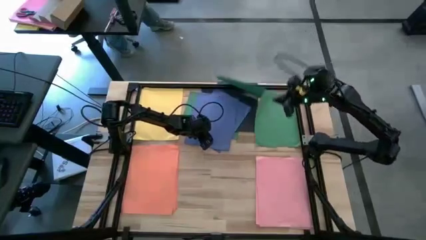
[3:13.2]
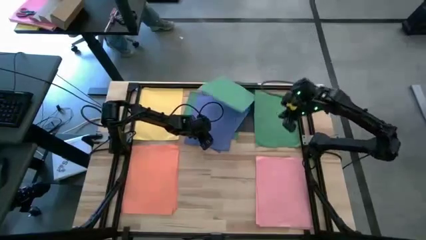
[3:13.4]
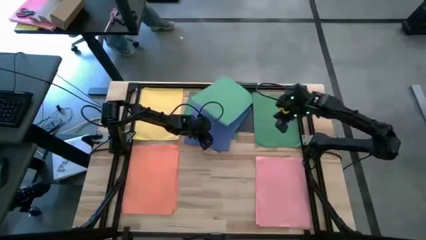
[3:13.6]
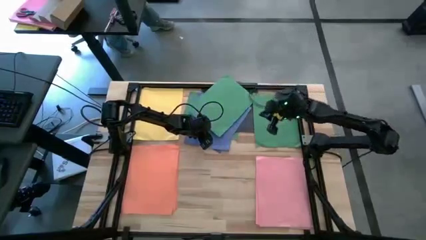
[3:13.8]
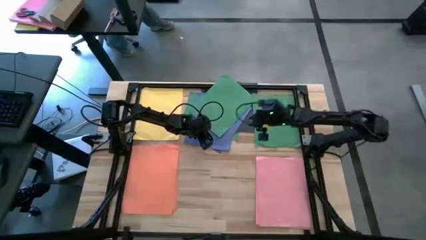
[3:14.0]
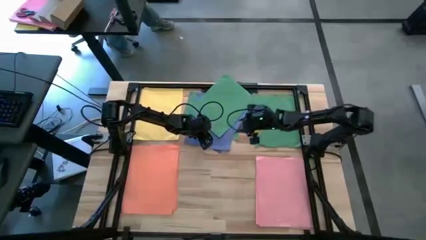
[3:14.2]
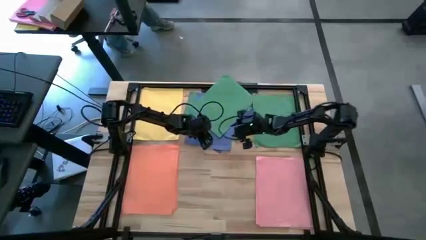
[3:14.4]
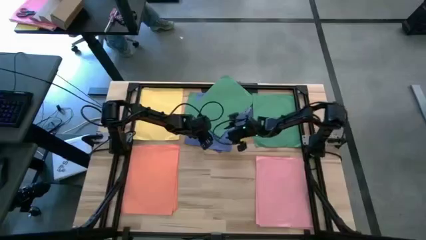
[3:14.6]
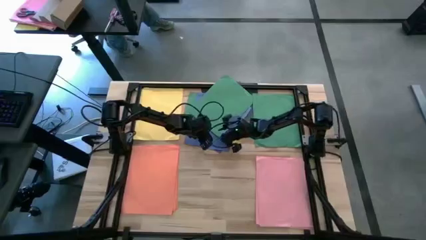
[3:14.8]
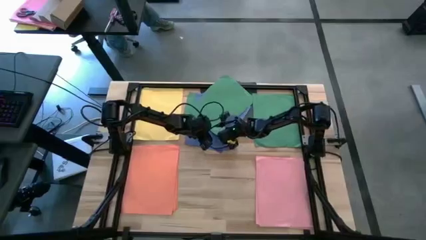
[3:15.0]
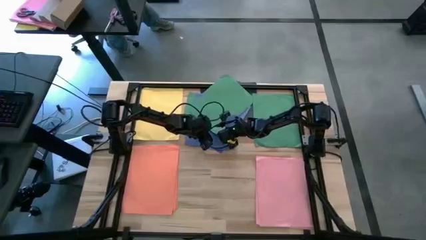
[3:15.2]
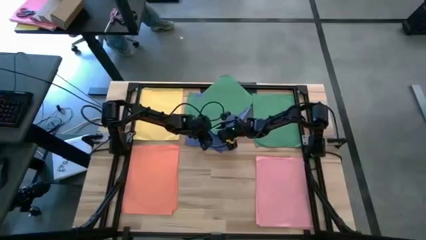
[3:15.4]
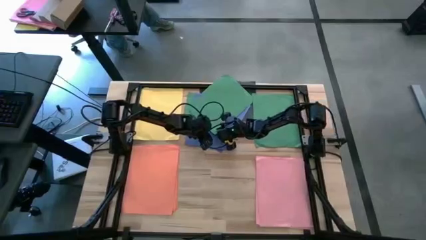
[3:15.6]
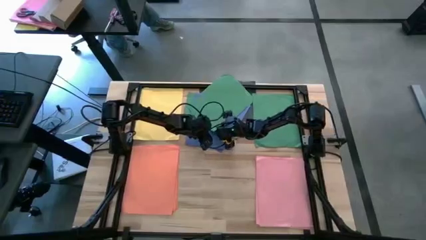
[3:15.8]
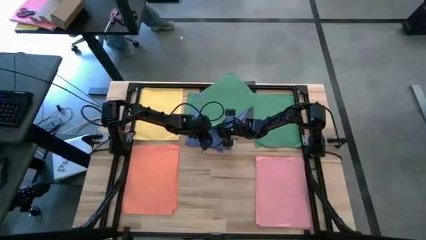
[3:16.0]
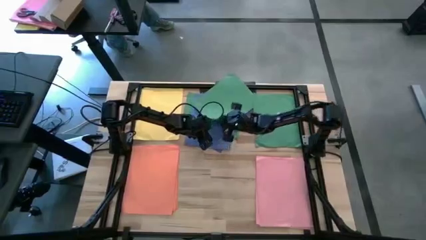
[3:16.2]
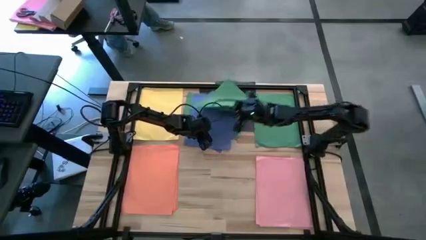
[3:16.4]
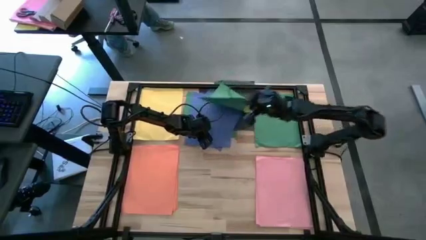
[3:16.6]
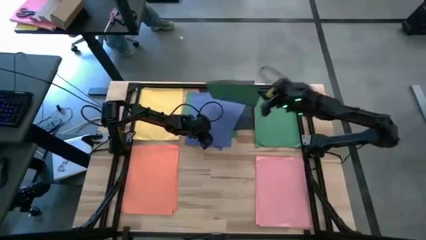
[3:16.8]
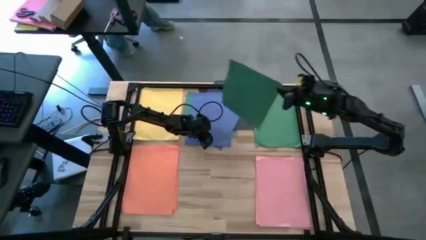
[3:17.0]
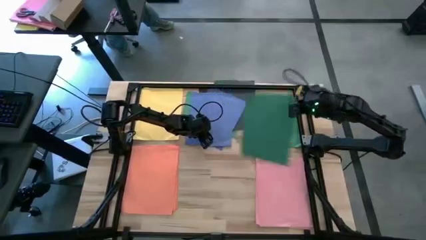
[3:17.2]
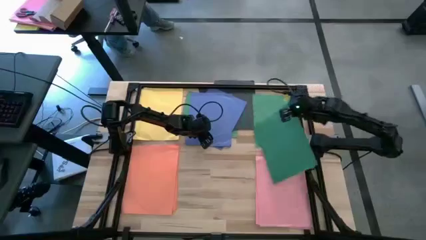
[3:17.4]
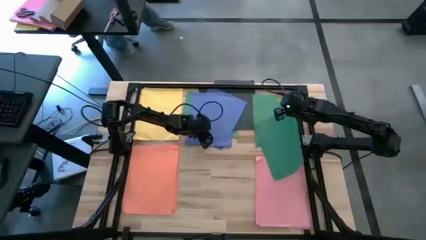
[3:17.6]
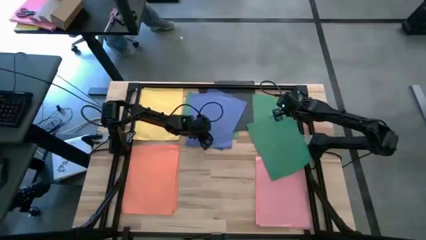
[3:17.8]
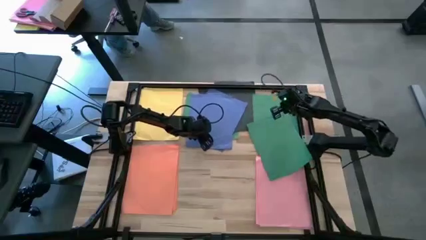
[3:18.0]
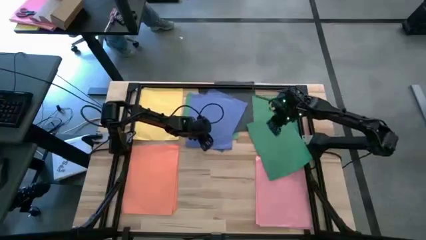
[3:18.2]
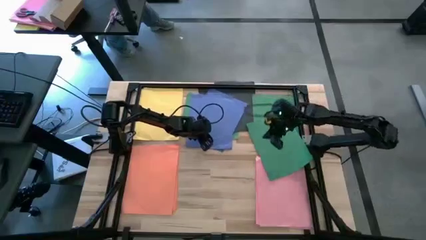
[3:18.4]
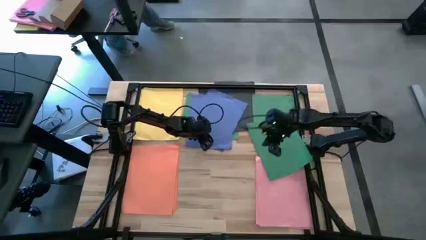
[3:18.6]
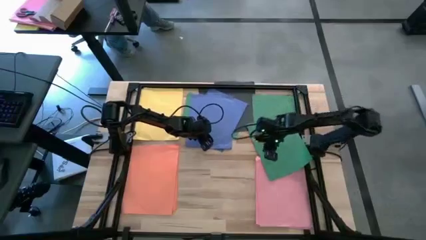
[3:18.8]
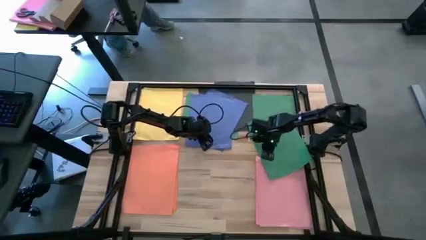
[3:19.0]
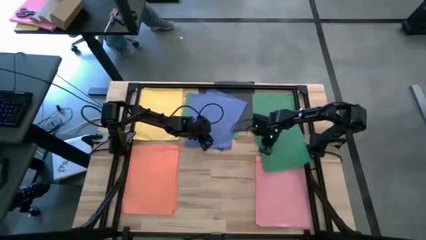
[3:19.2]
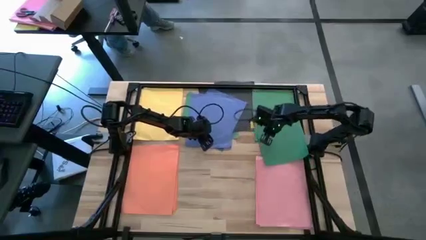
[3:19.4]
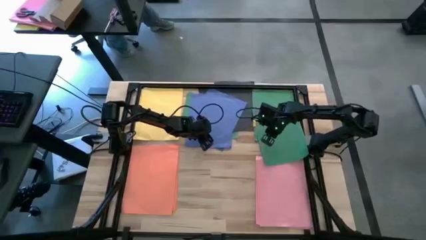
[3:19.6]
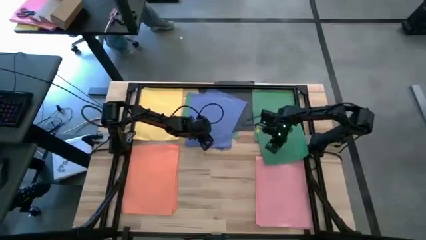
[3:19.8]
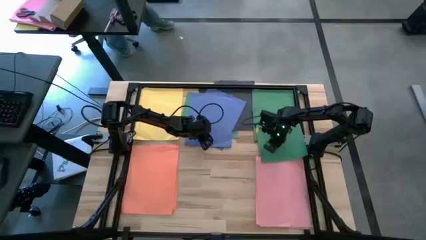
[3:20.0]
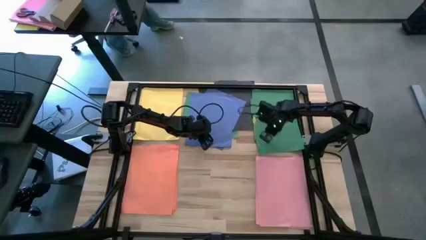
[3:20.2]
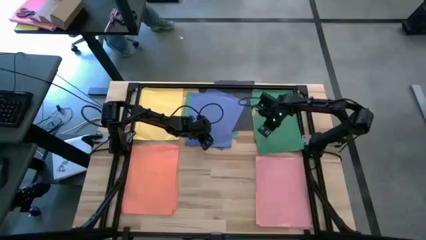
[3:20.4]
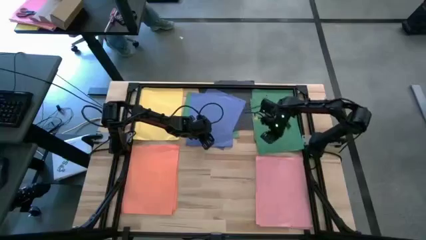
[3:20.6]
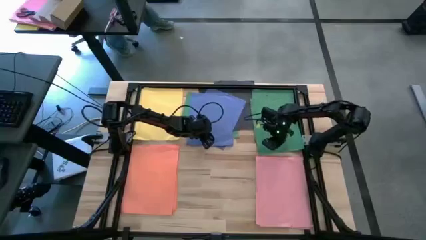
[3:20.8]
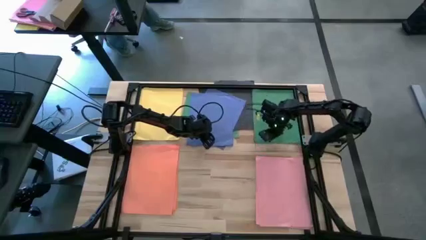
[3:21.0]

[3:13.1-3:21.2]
Task: Organize paper
Stack the green paper on top of the other green paper

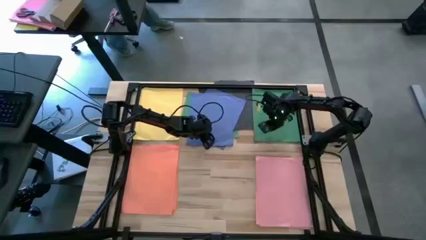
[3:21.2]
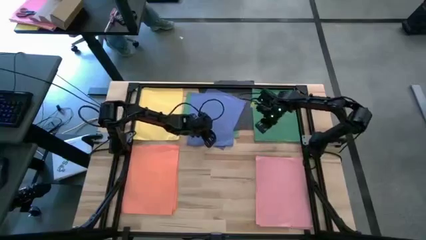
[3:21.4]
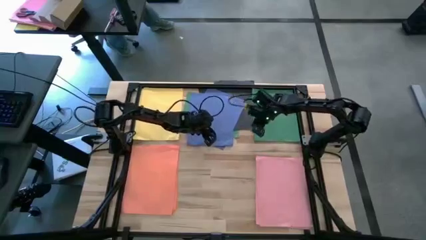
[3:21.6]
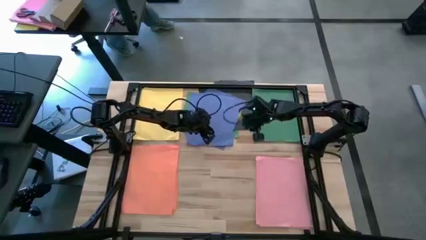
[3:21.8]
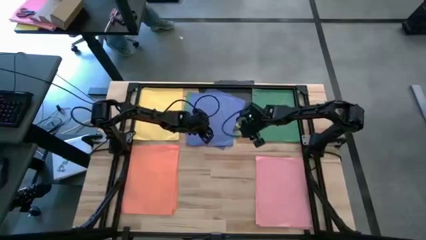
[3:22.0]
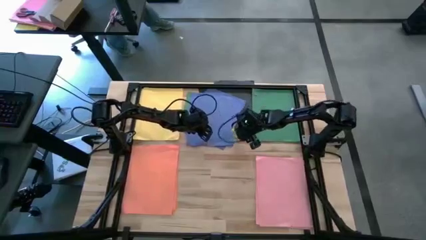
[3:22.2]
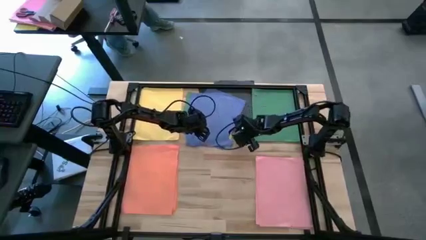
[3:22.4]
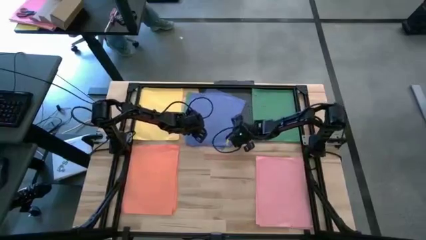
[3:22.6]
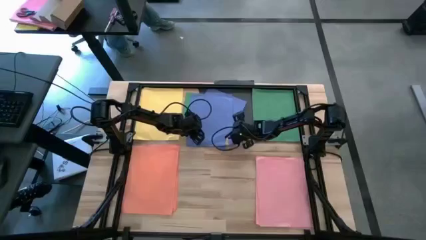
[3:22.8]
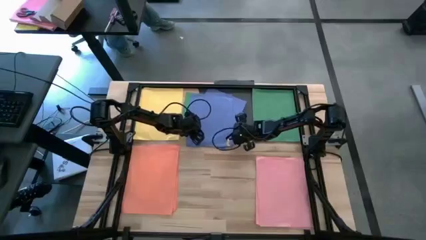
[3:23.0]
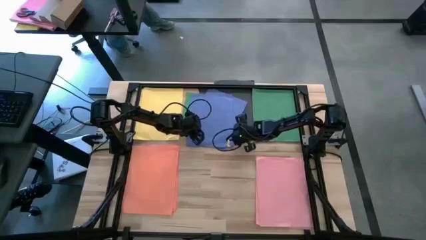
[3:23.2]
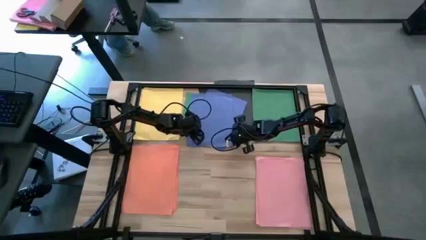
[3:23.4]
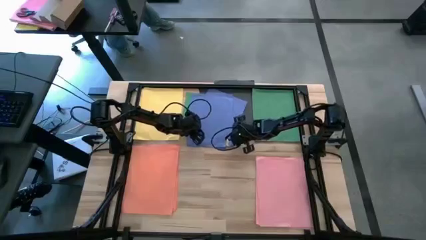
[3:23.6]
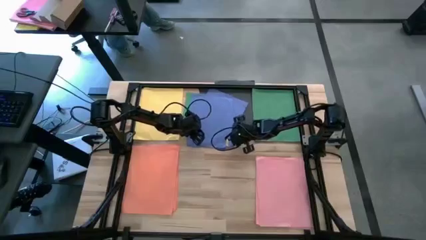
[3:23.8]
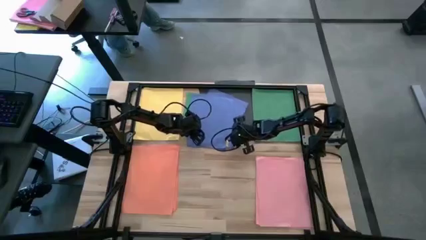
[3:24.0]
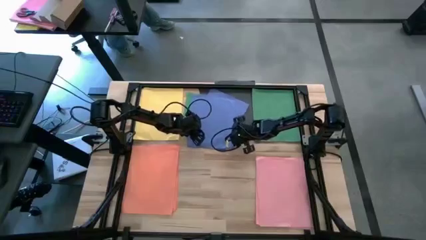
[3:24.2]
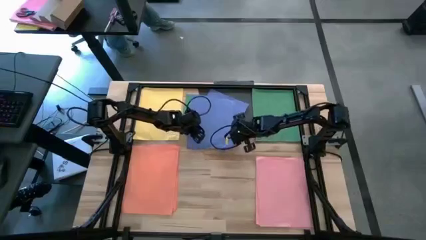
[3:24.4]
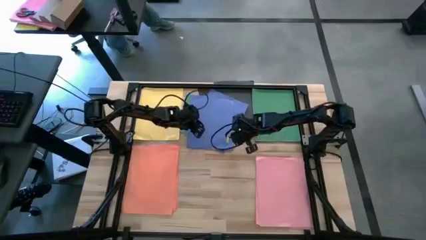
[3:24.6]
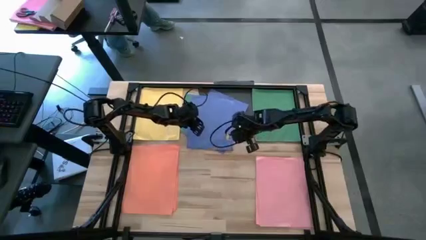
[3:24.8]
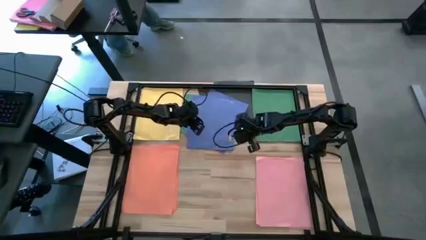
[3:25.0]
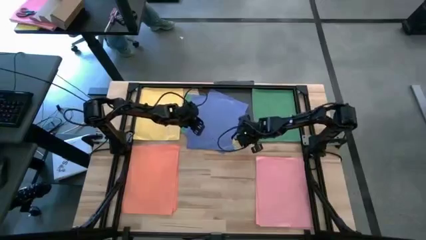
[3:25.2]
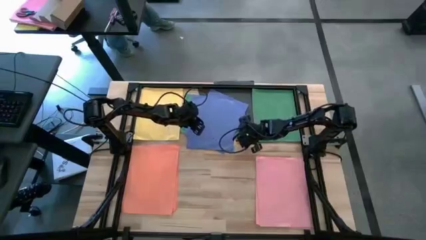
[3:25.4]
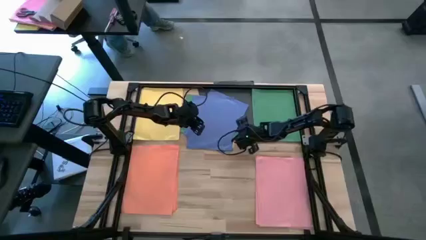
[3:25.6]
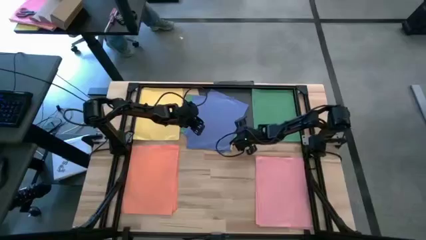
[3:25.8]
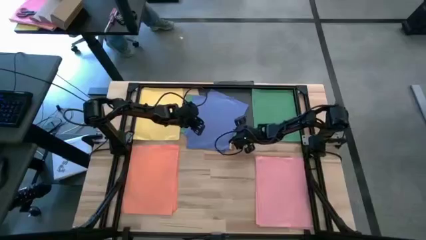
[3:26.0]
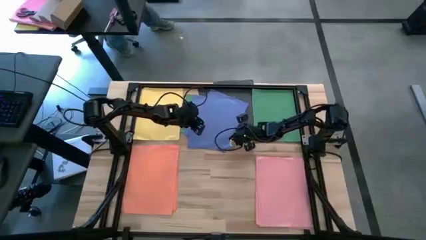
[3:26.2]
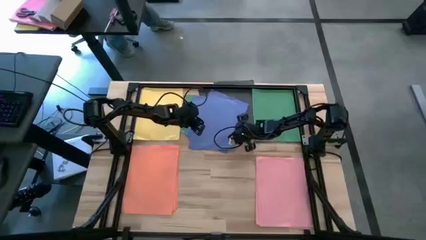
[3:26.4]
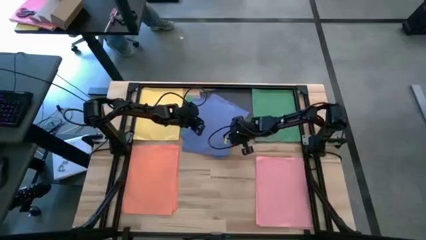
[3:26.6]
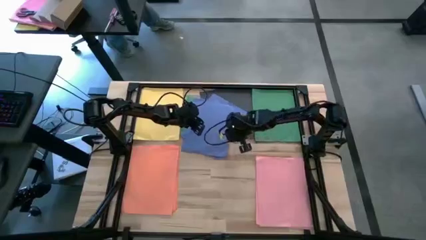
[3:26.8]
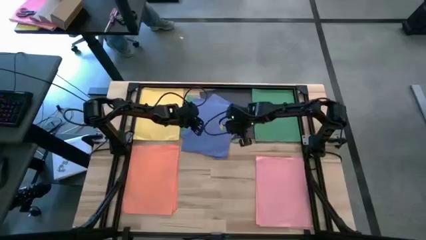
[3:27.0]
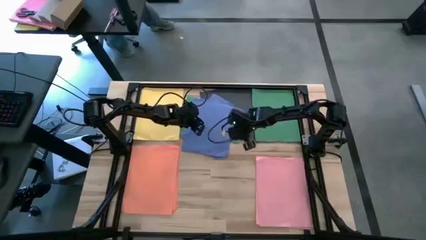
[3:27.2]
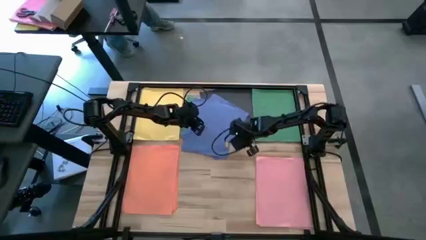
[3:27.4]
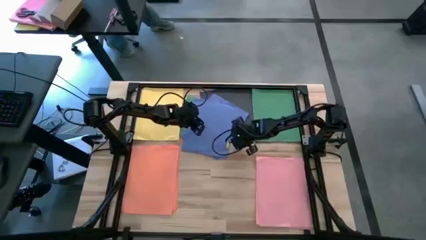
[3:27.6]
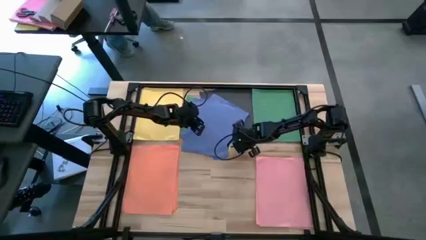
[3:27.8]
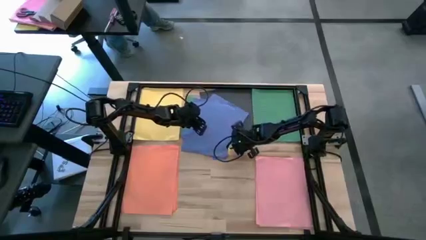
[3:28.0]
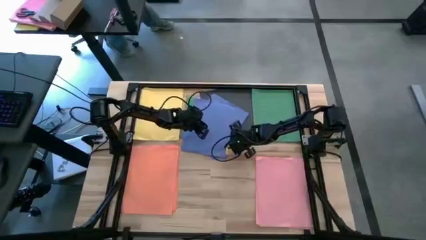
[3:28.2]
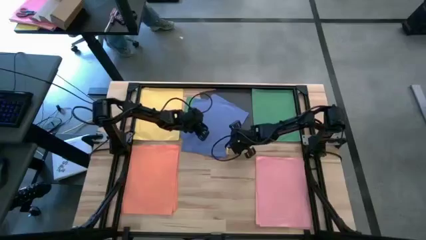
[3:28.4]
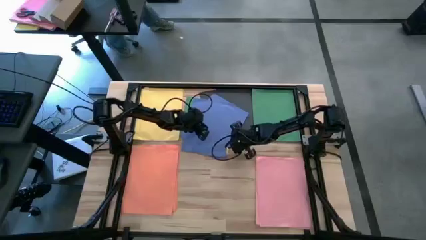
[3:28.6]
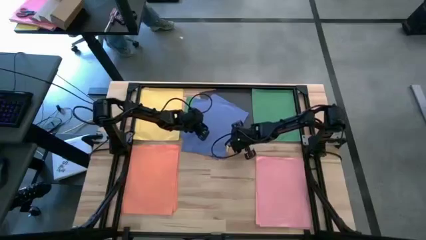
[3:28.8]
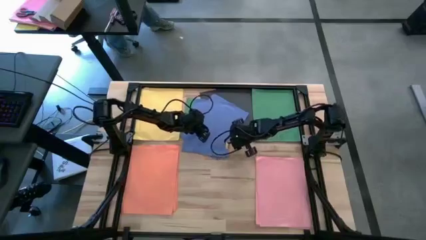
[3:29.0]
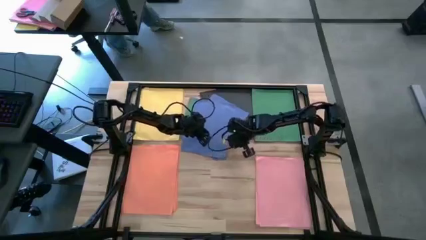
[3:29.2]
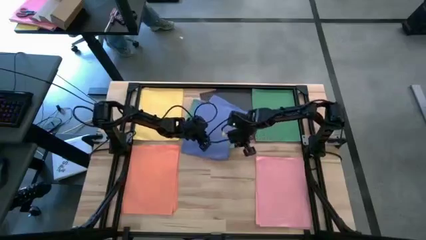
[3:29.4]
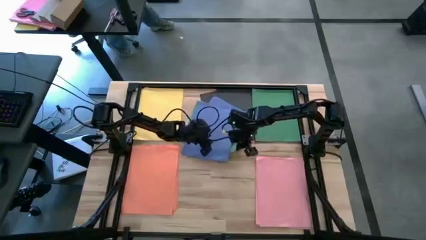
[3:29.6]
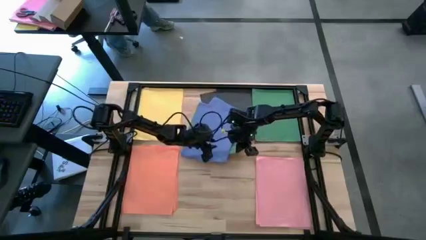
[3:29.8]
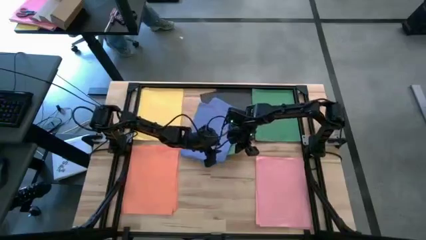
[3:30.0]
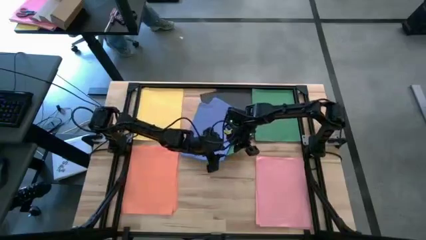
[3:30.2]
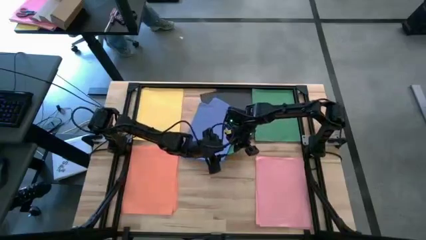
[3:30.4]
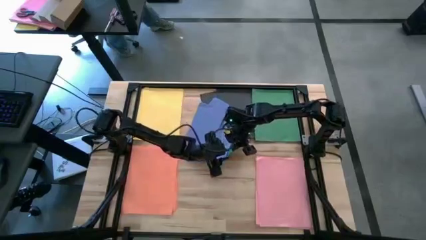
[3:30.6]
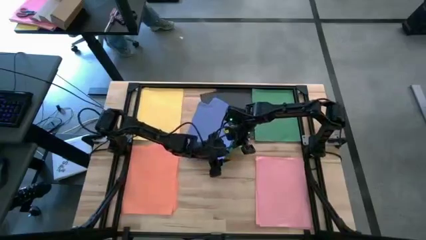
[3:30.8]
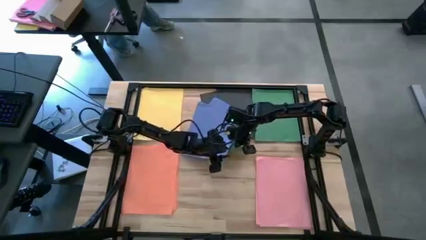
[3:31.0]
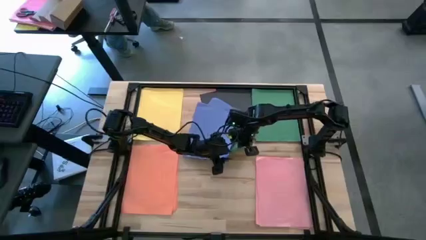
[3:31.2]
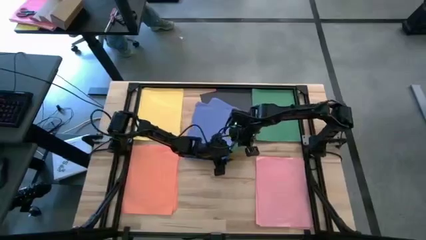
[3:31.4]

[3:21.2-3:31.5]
Stack the green paper on top of the stacked green papers
